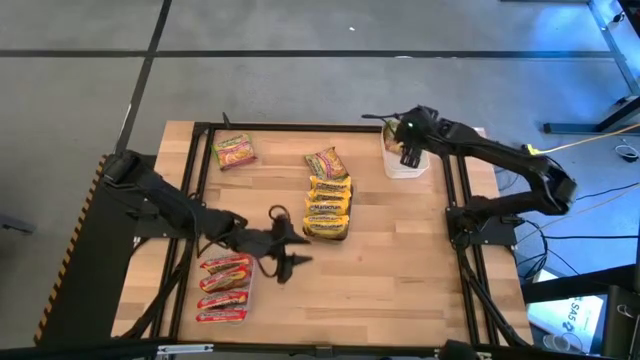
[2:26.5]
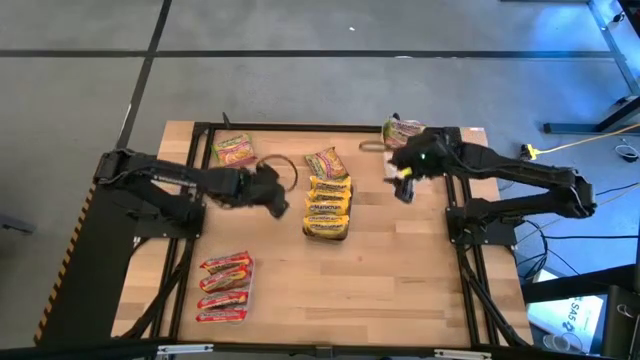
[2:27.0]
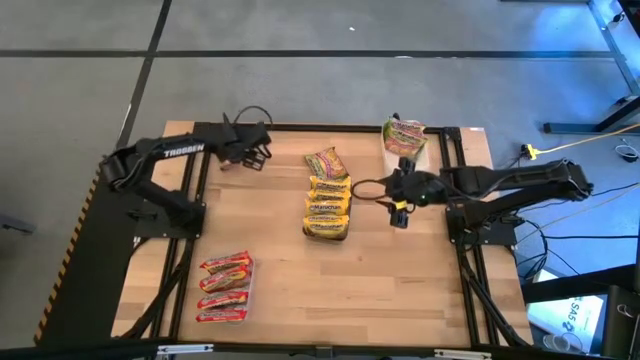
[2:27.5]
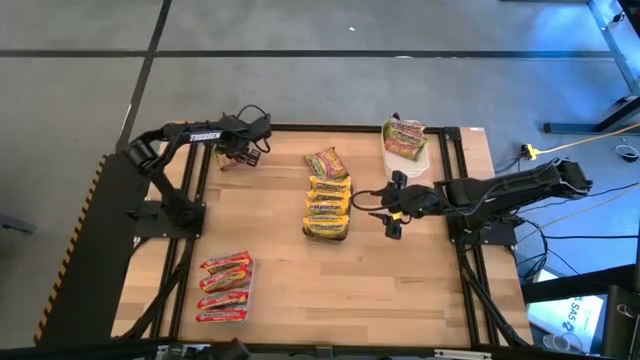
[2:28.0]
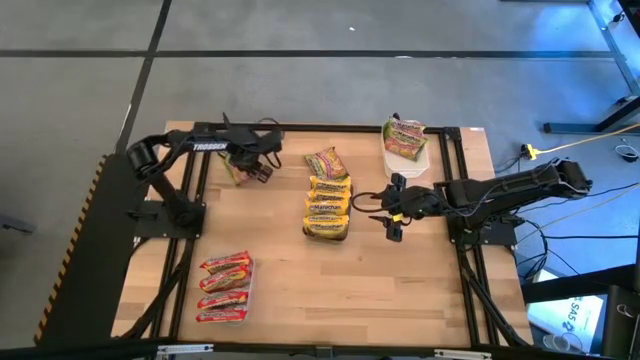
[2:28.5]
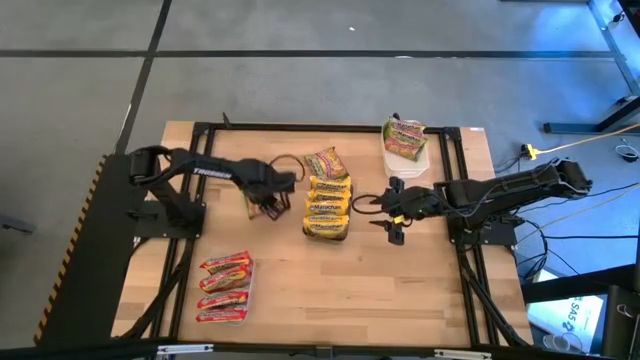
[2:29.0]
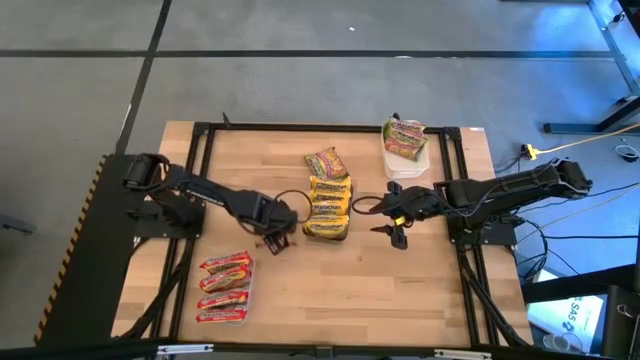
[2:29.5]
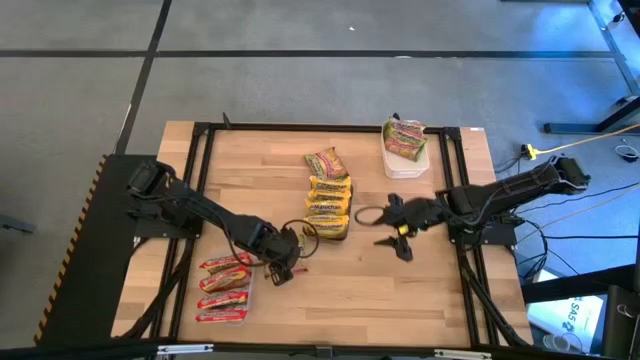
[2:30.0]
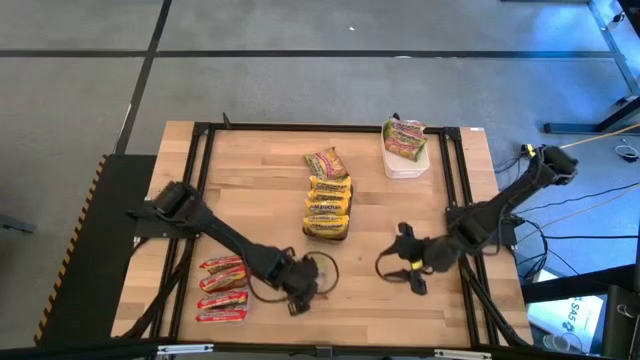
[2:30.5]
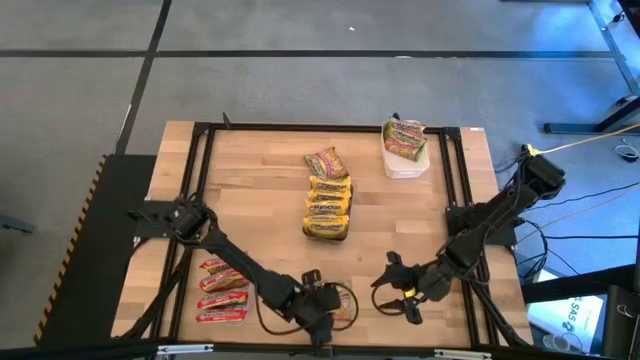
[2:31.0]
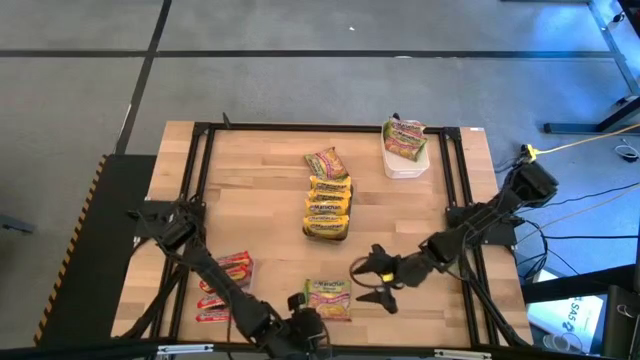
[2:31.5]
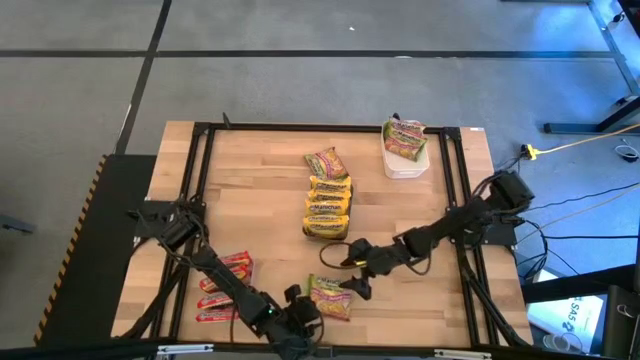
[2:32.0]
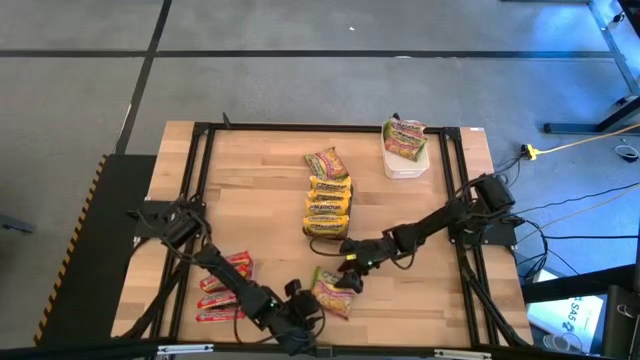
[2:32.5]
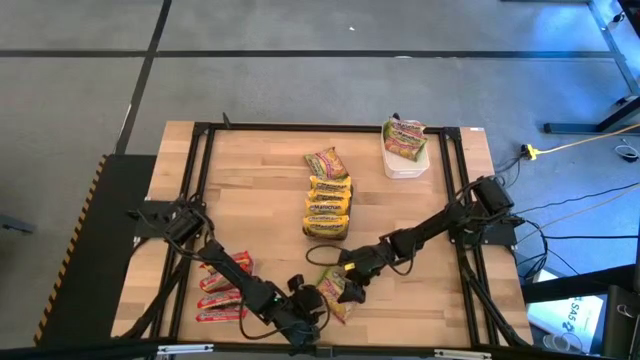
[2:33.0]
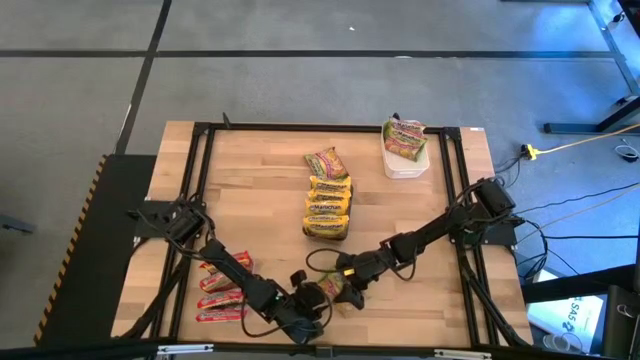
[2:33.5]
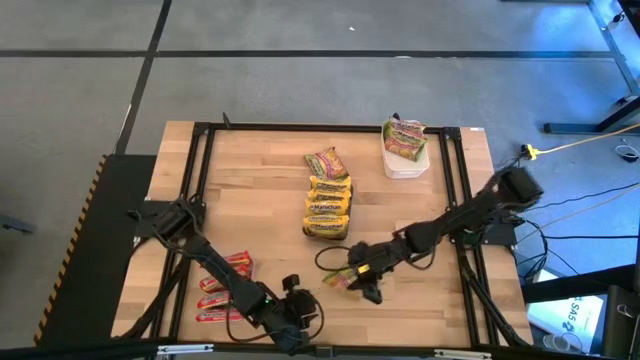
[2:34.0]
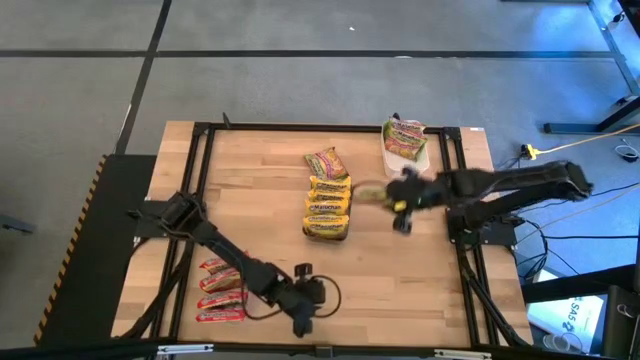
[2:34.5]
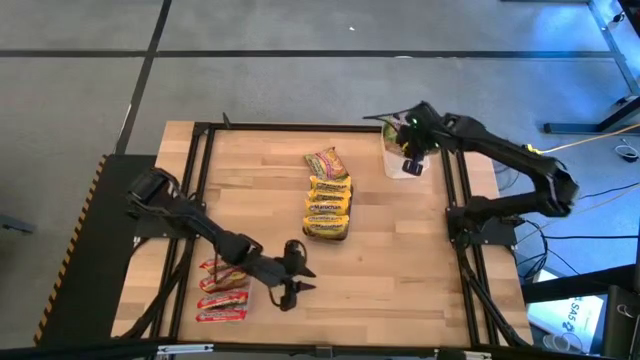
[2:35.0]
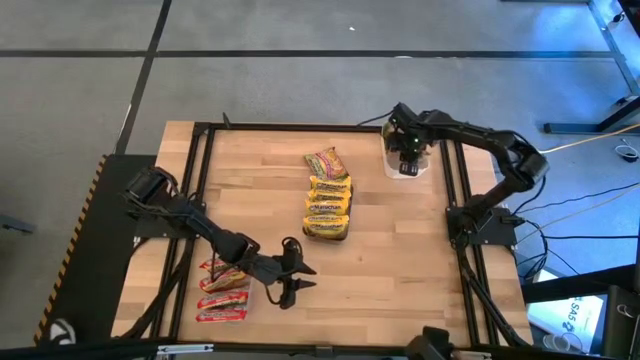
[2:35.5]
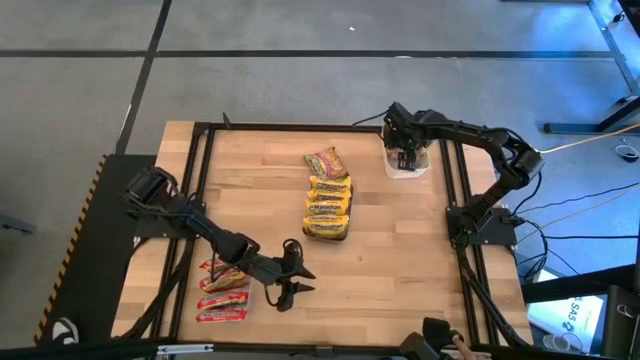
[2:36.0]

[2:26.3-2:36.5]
Task: Sort Maruchan noodles
Put the green noodle pack into the white bin

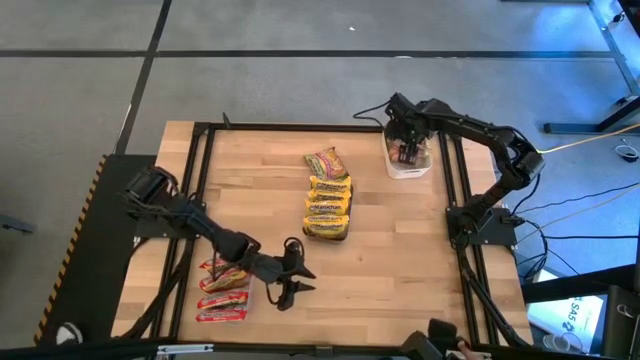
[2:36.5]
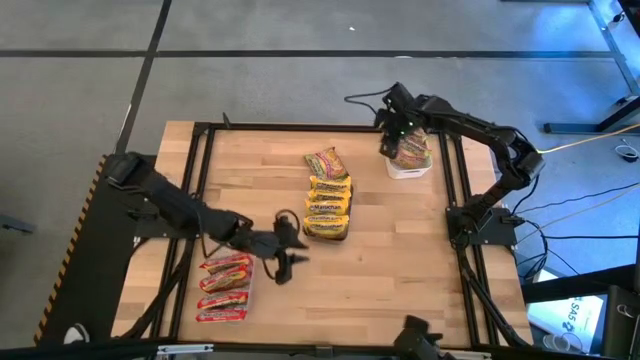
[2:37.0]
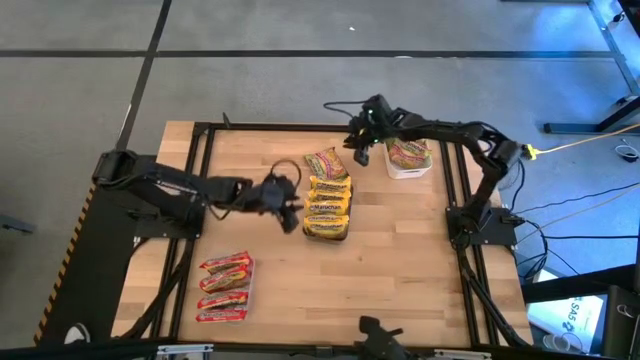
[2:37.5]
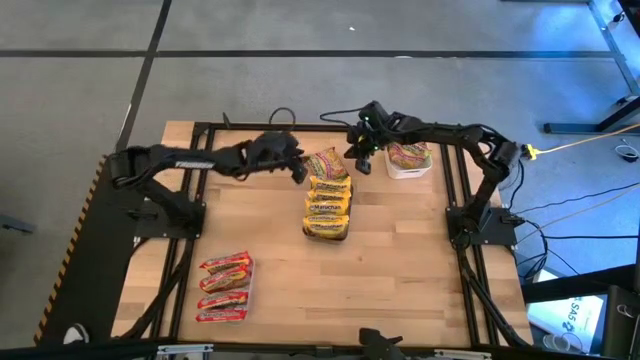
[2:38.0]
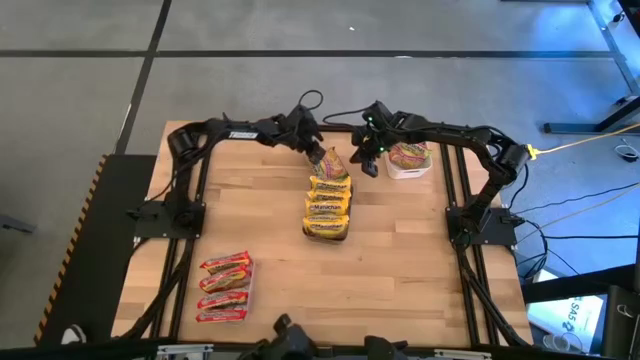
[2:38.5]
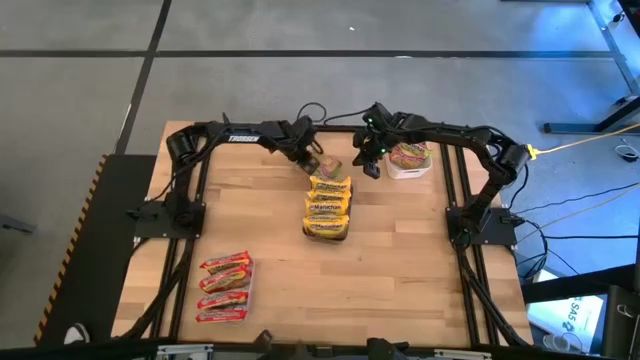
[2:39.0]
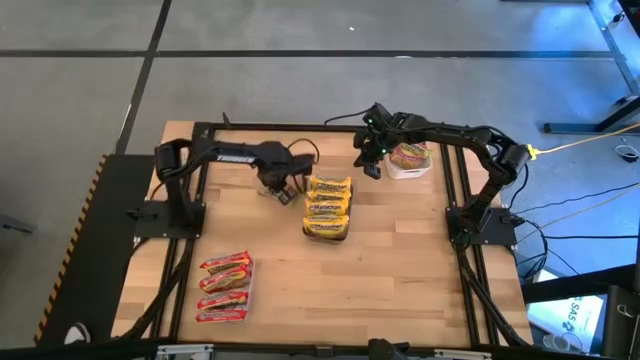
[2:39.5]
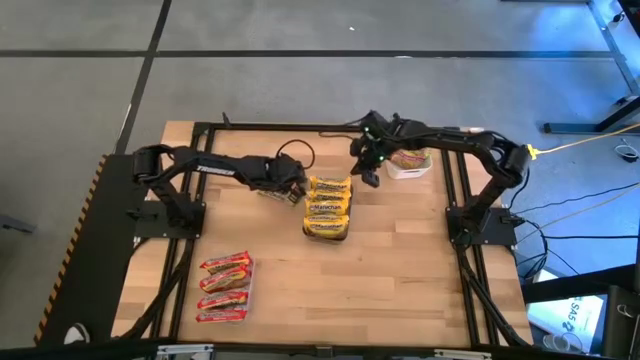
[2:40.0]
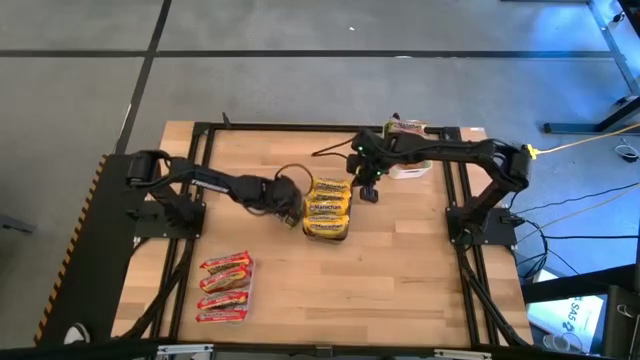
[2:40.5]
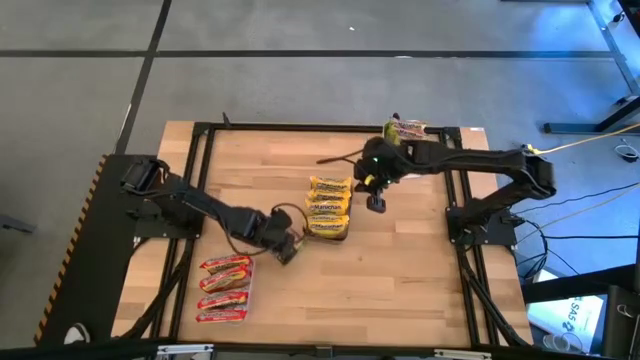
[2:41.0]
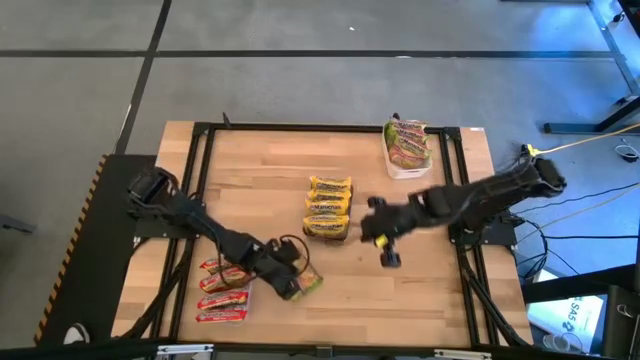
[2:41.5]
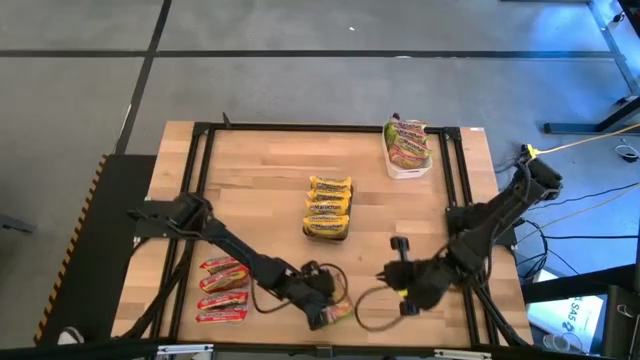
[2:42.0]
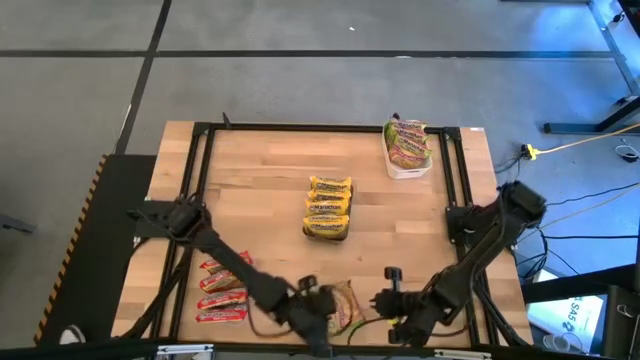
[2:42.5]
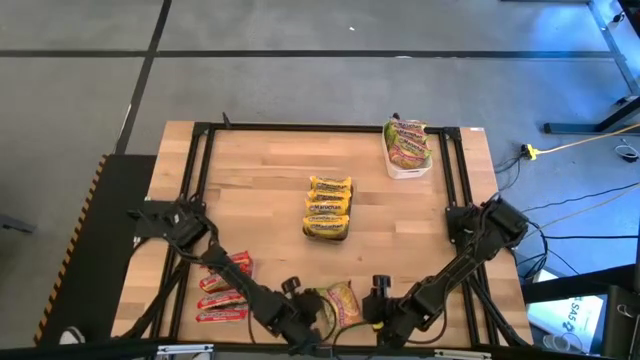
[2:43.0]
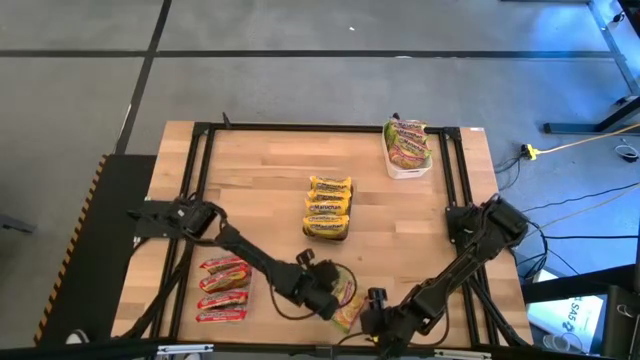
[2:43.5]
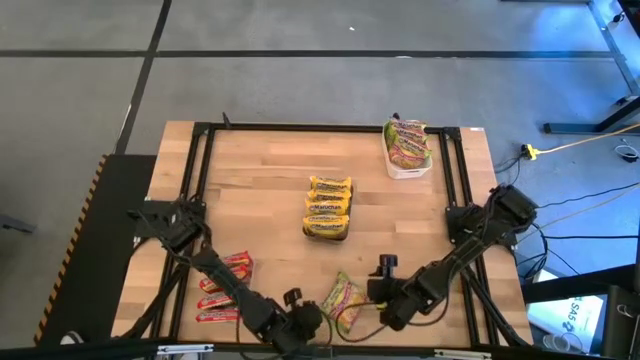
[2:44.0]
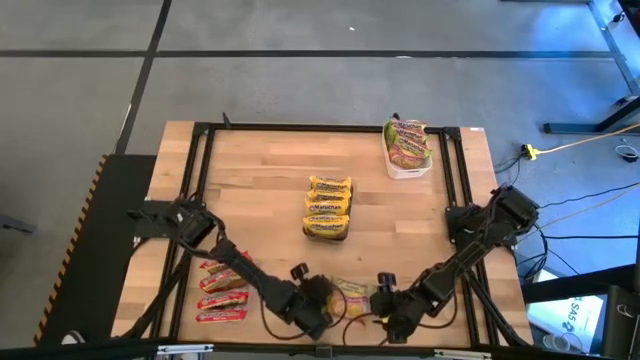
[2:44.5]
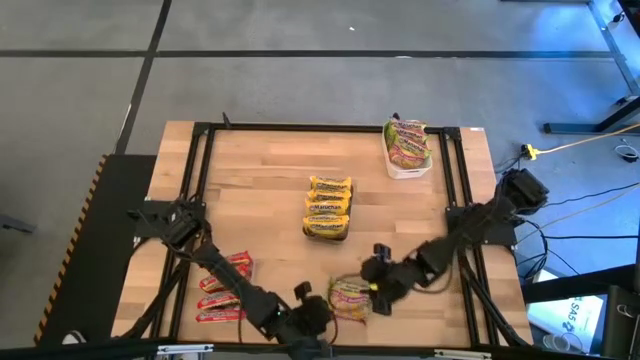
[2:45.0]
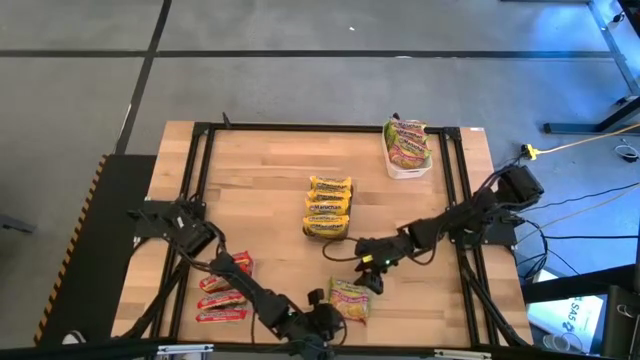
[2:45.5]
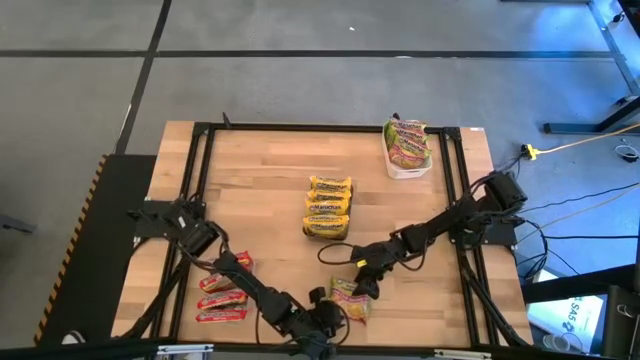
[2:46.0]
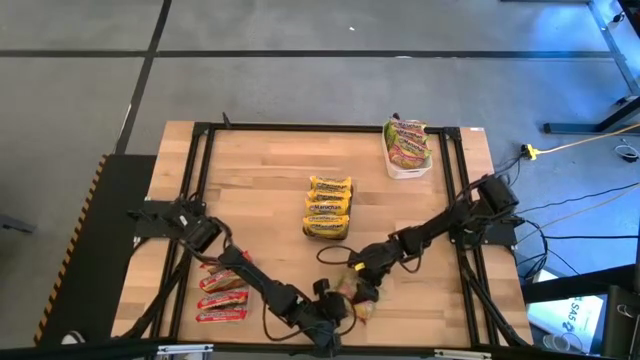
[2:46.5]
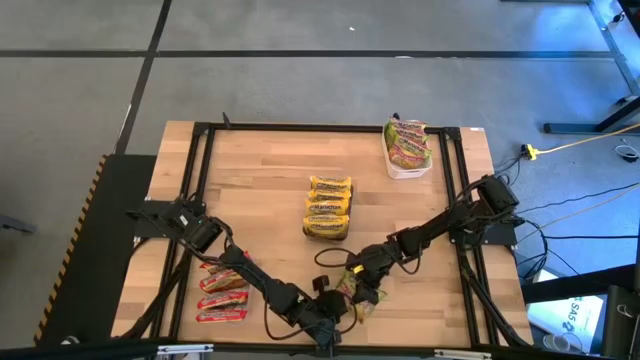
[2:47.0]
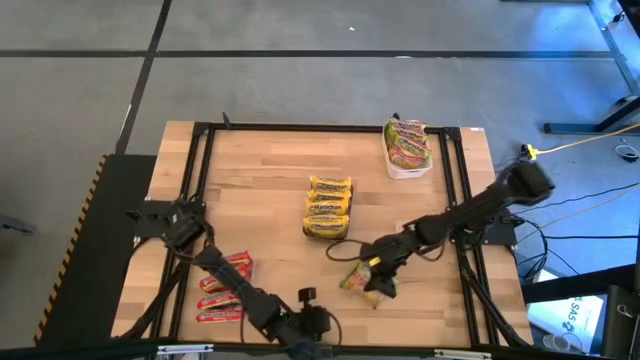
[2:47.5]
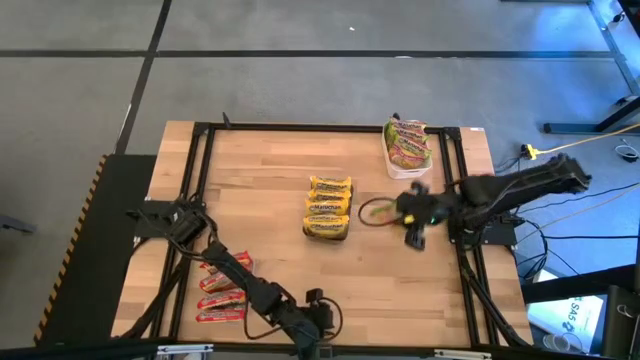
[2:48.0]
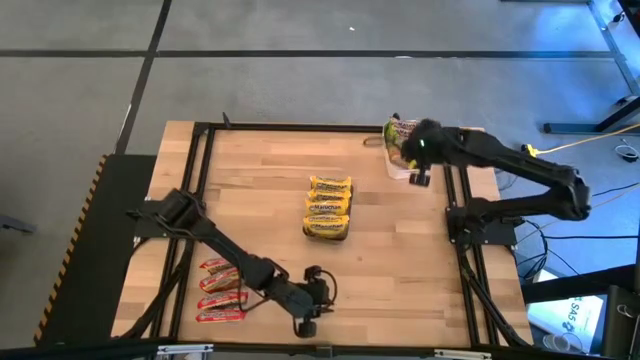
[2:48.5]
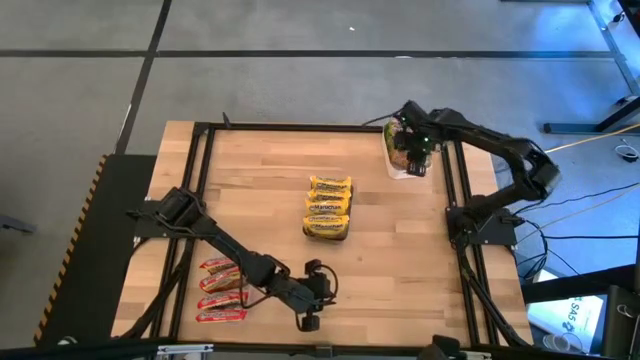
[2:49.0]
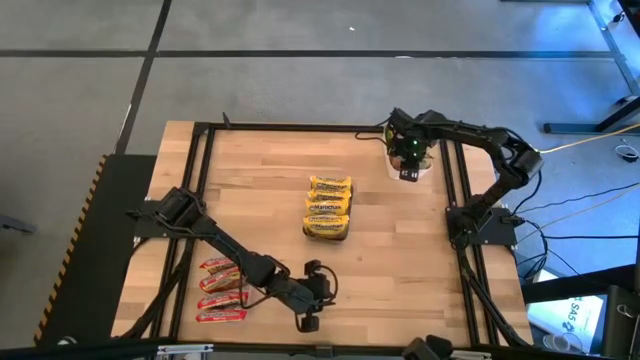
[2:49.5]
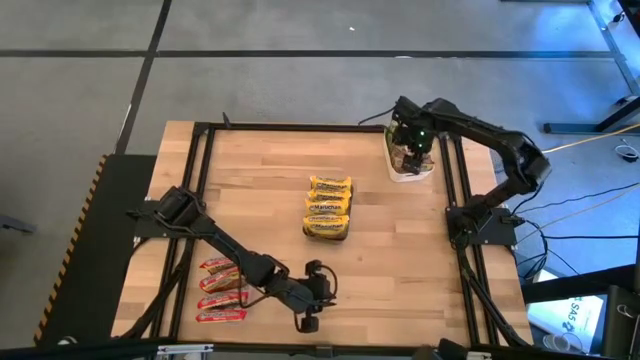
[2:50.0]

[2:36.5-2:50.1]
Put the green noodle pack into the white bin
